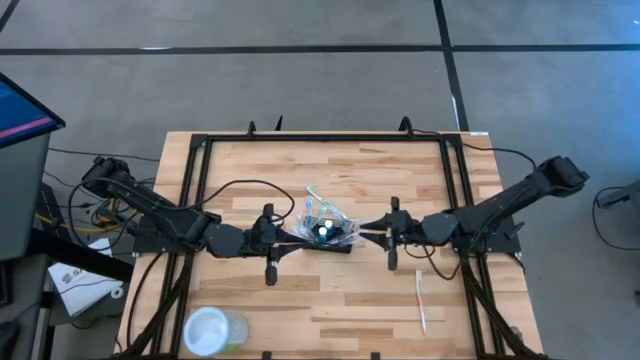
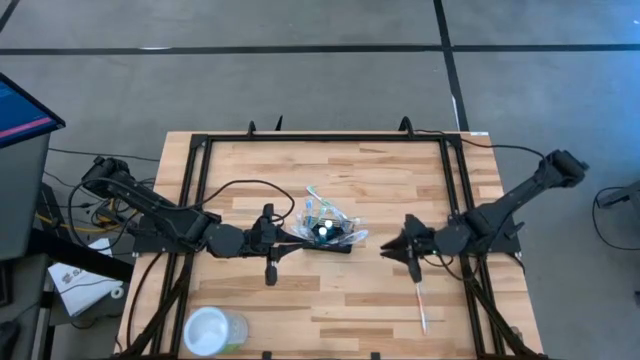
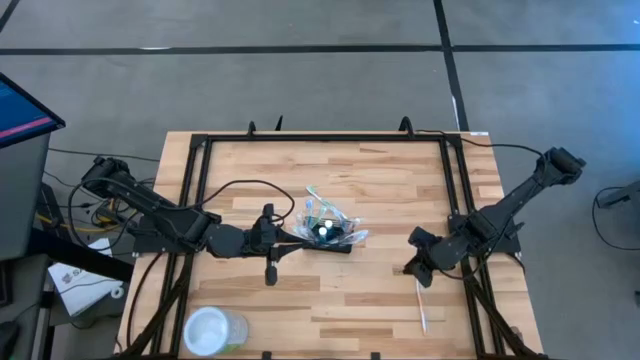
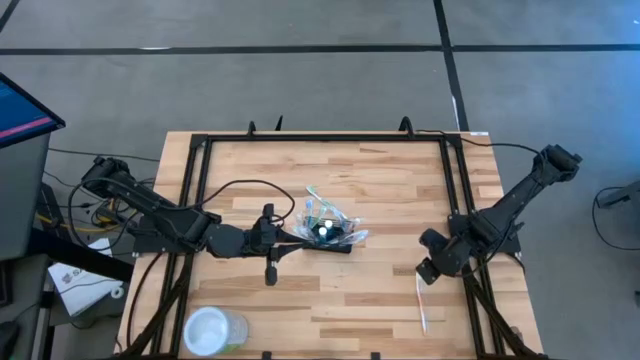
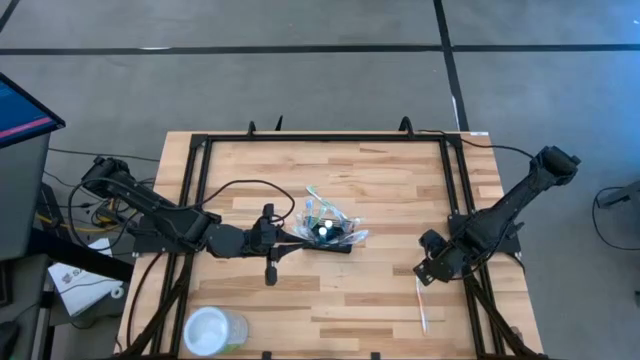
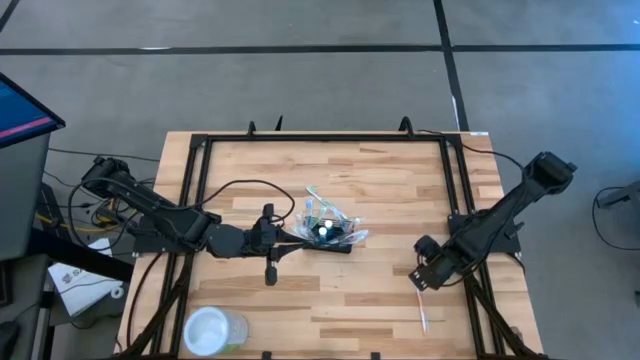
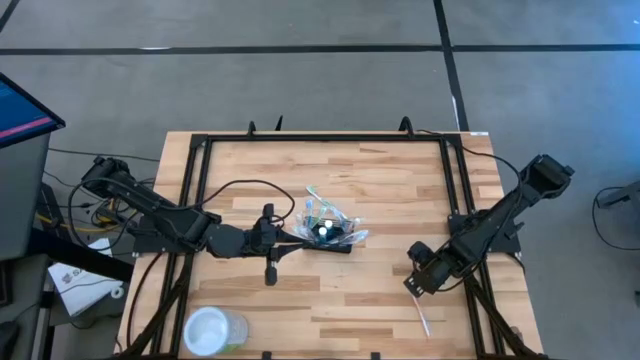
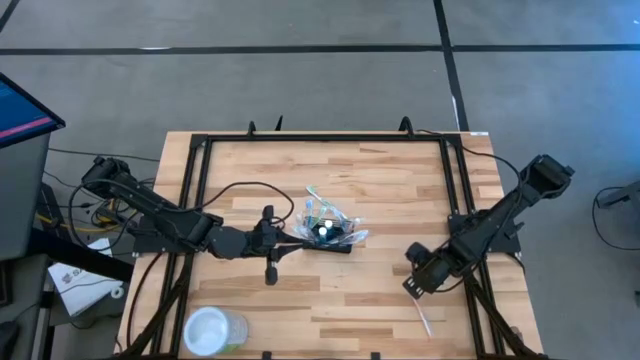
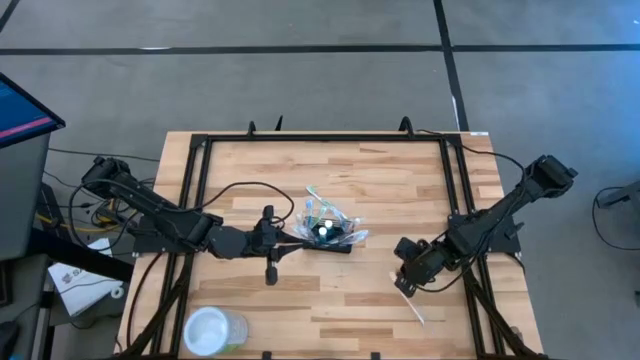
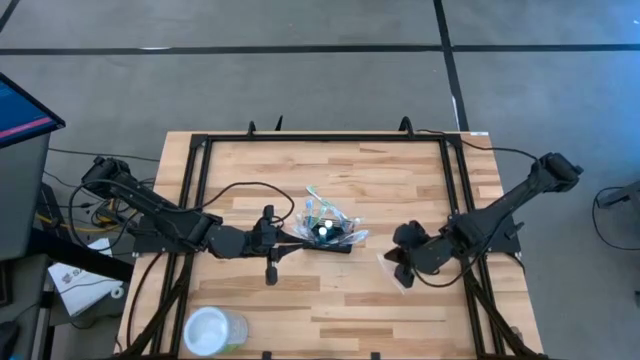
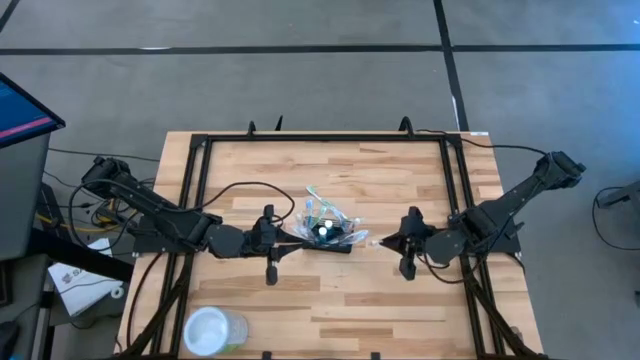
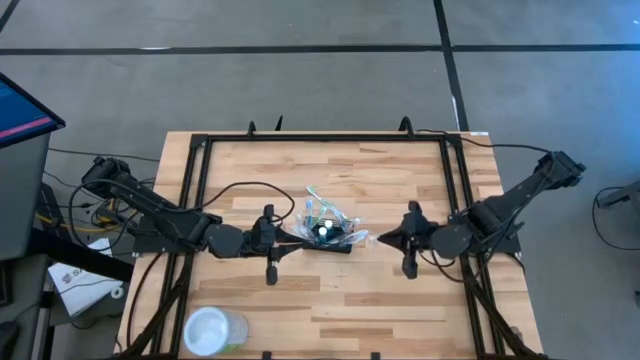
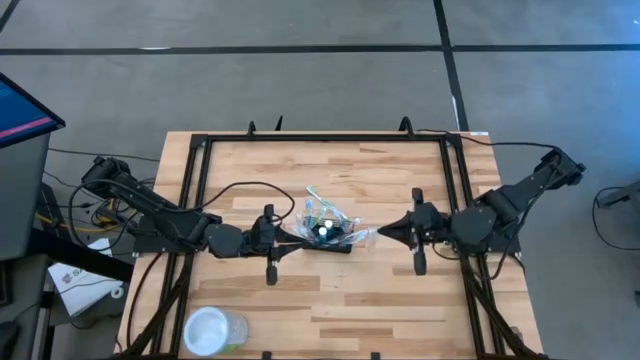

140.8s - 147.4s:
Task: Pick & Place toothbrushing station
Put the orange toothbrush into the wire organizer

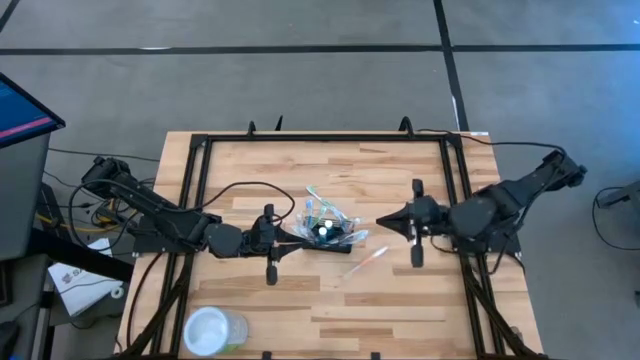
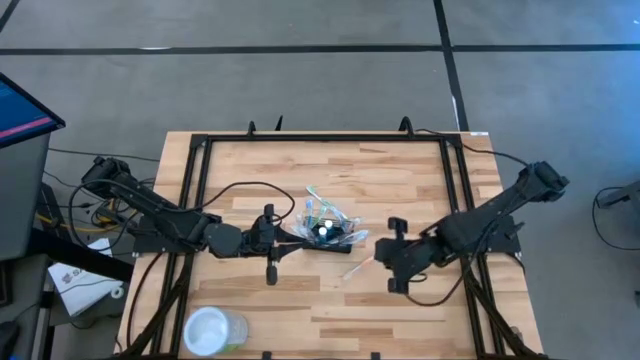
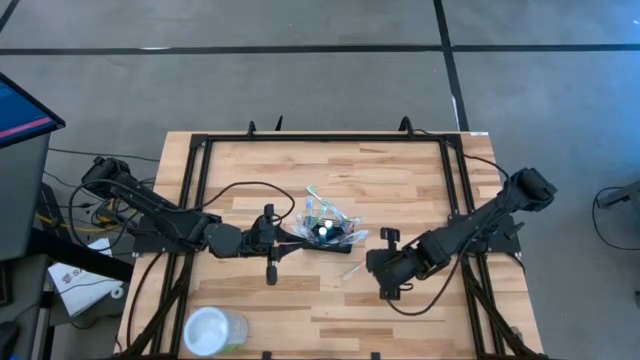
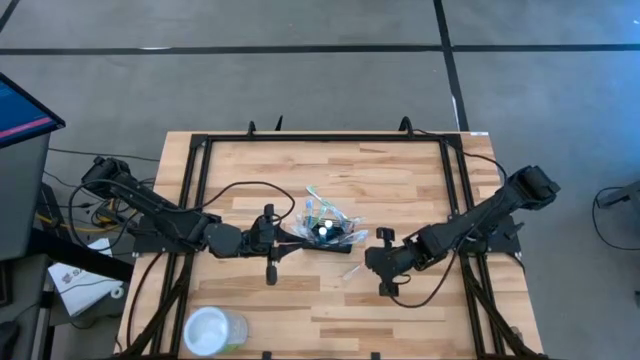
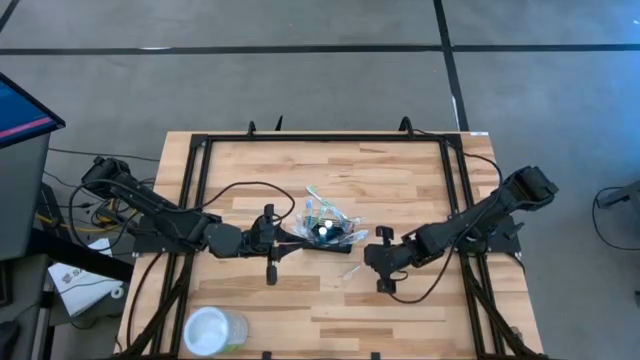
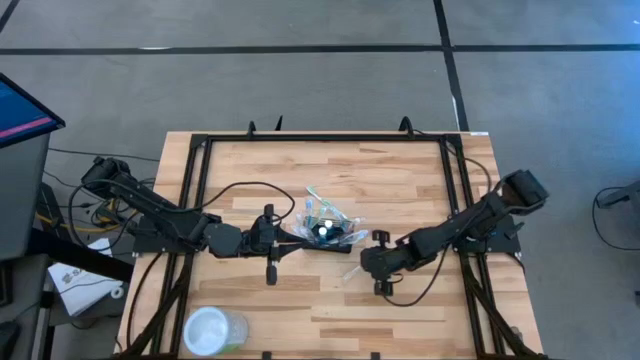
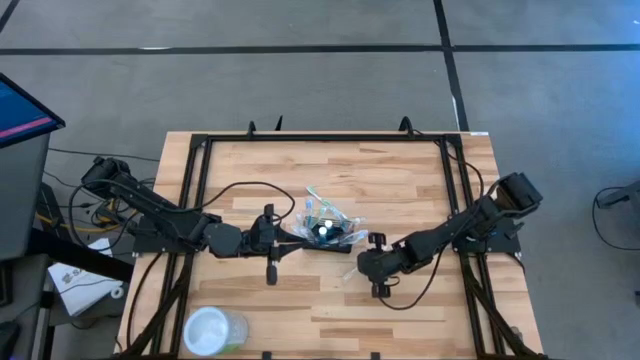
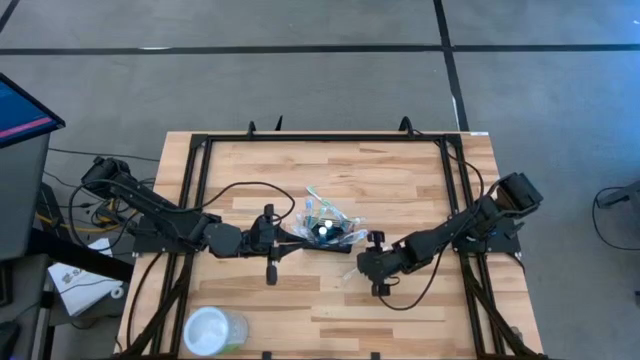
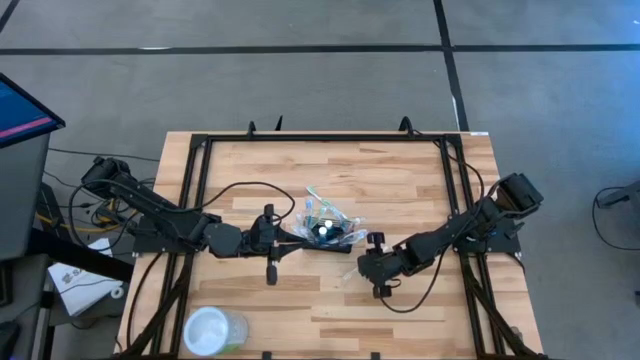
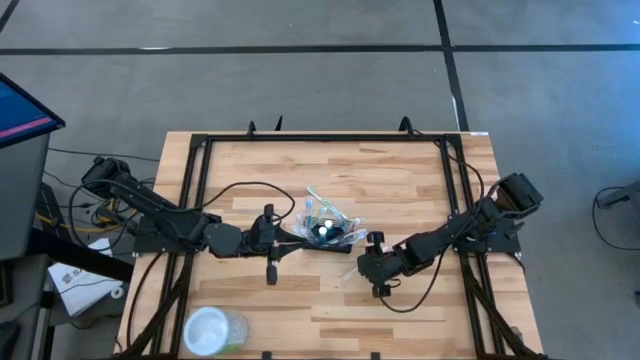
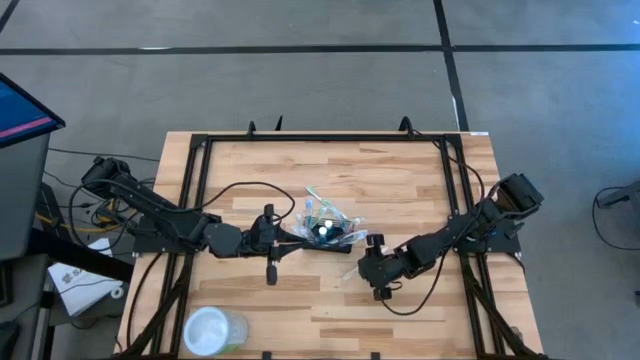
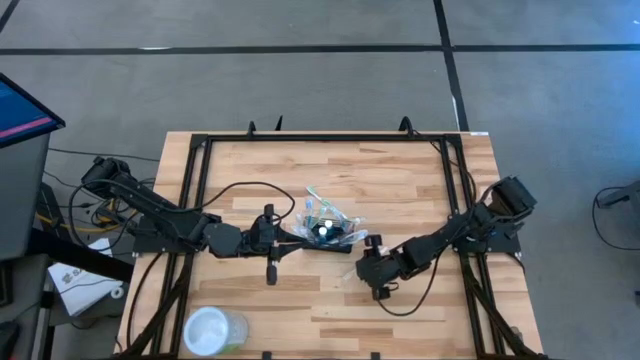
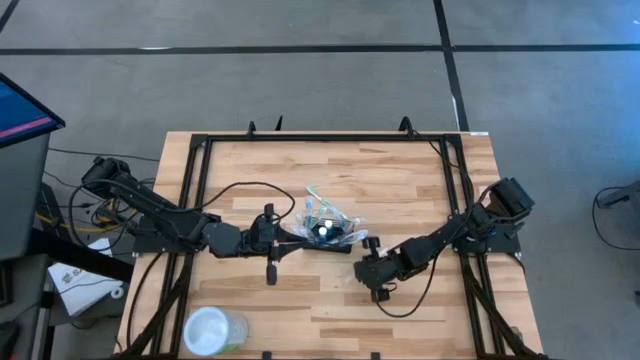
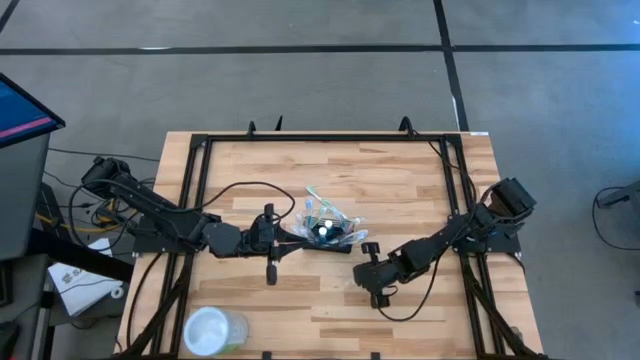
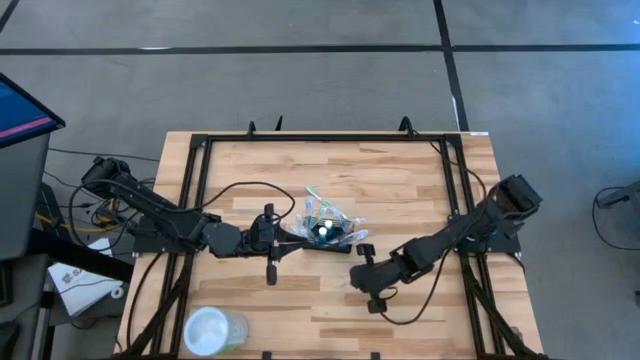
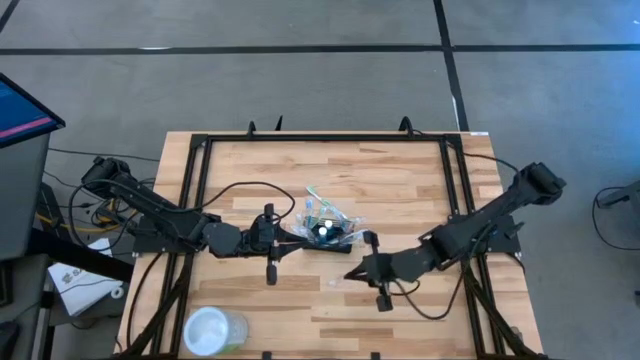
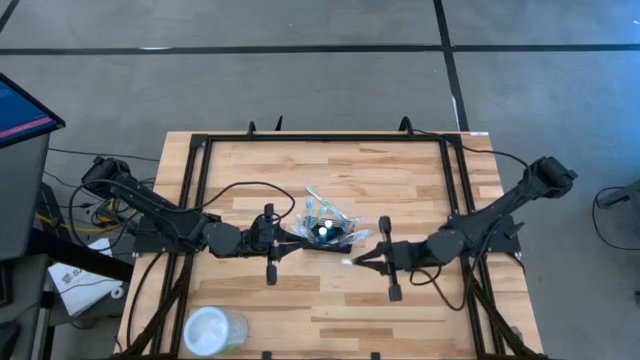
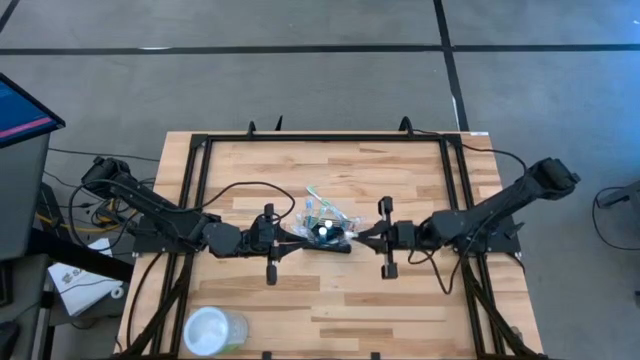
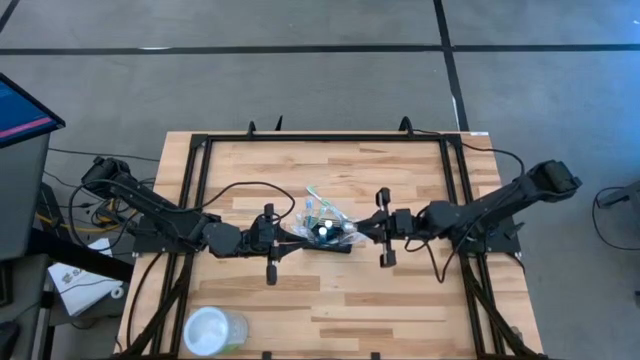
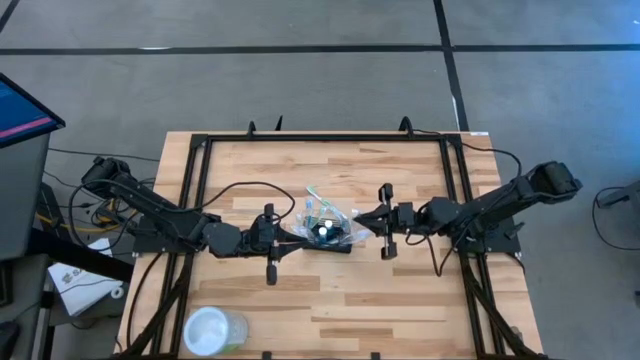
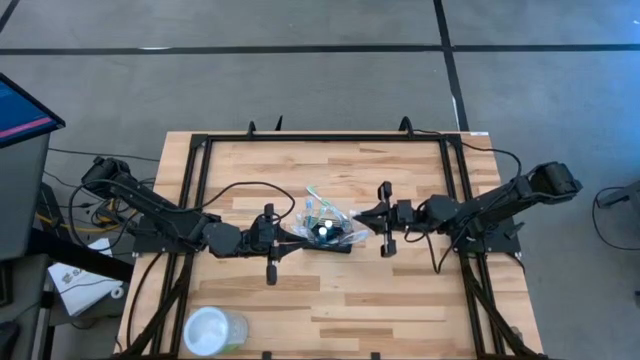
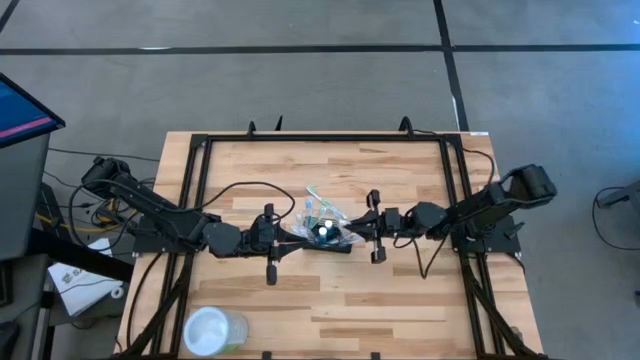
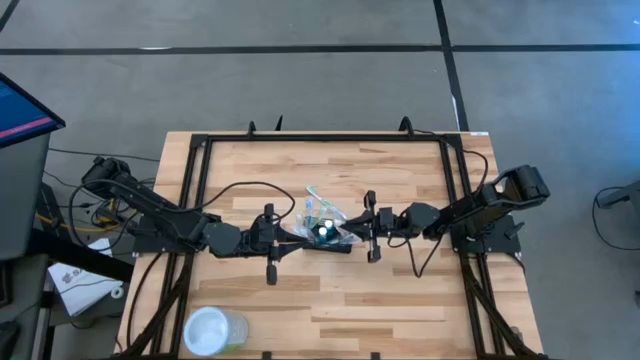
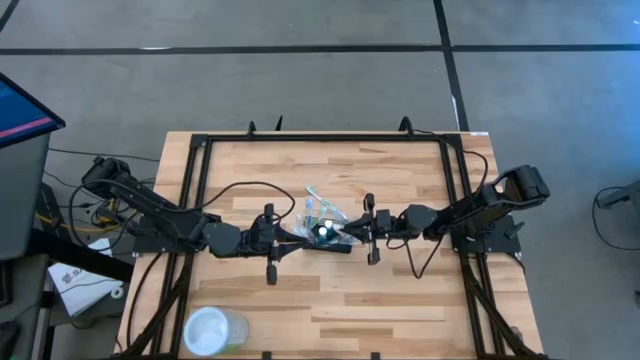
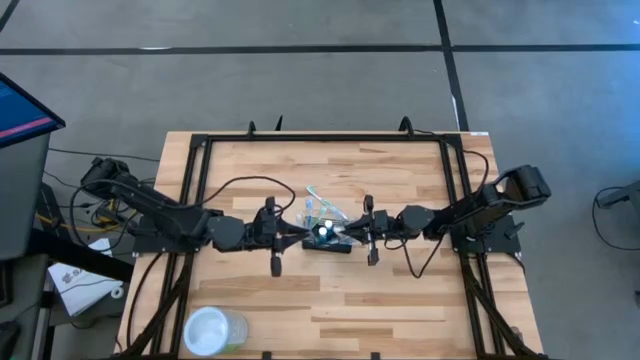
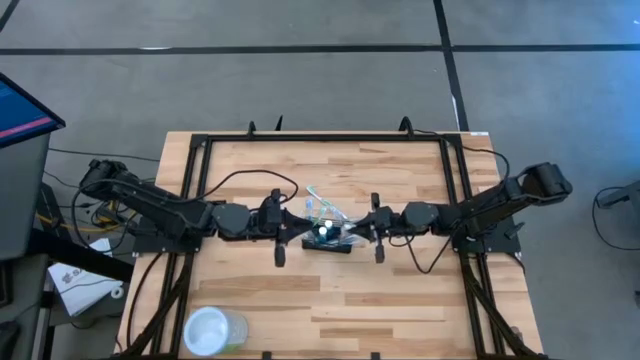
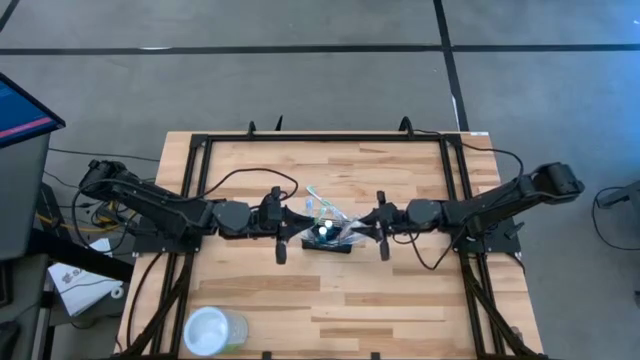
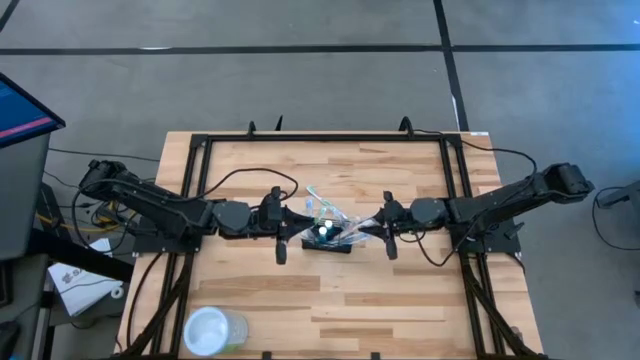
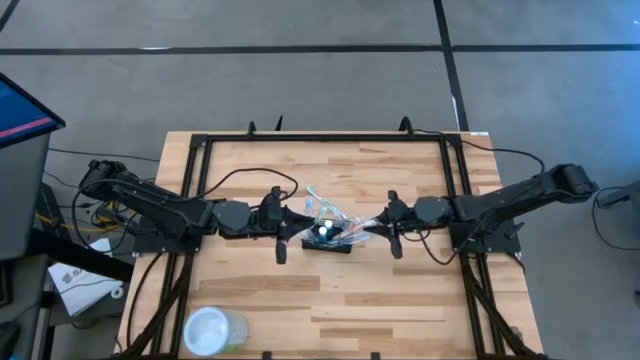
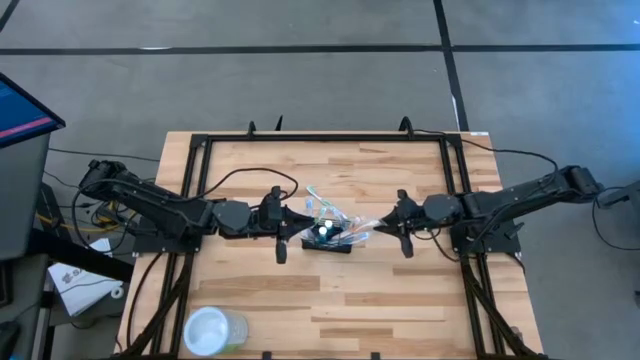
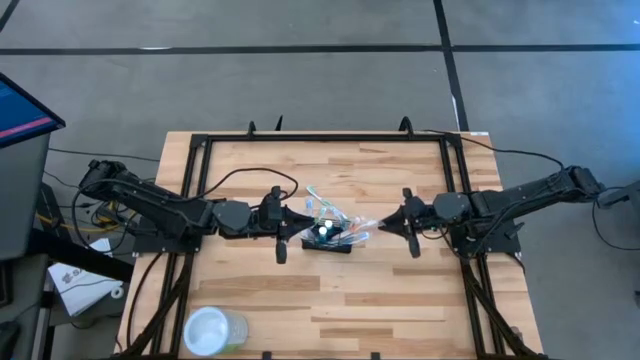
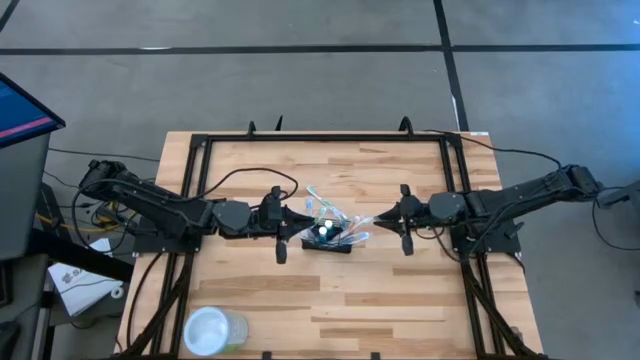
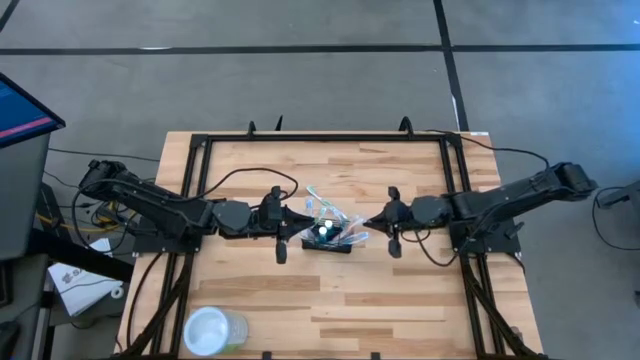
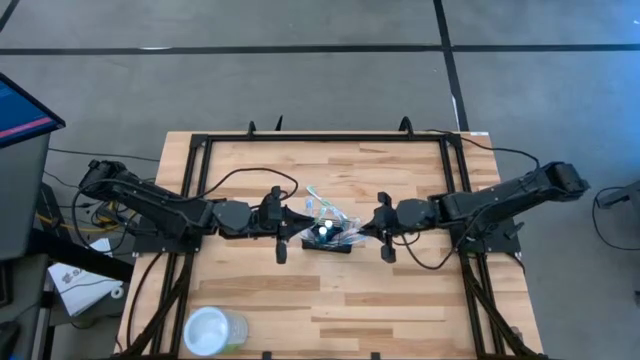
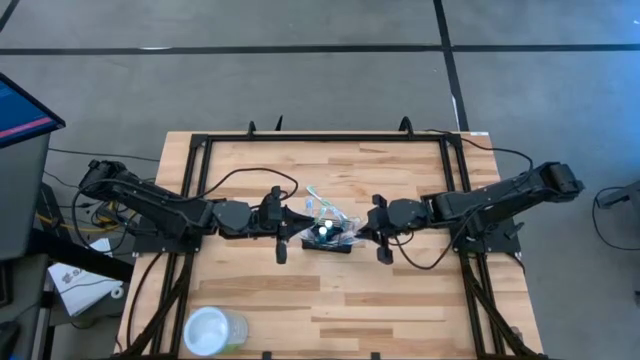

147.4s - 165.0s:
Put the orange toothbrush into the wire organizer
